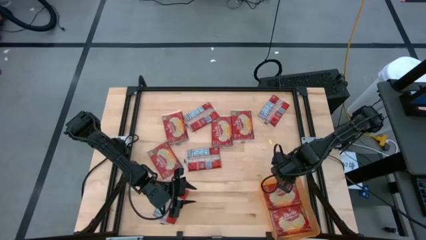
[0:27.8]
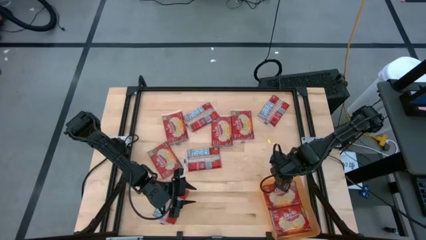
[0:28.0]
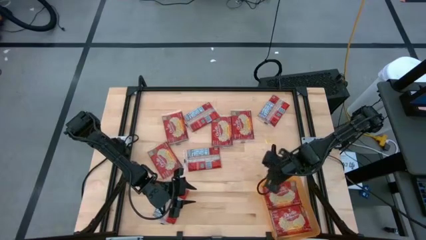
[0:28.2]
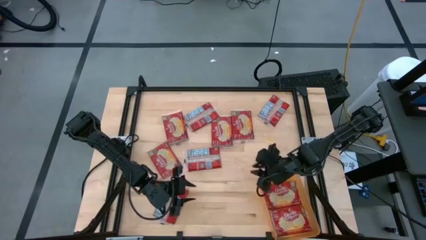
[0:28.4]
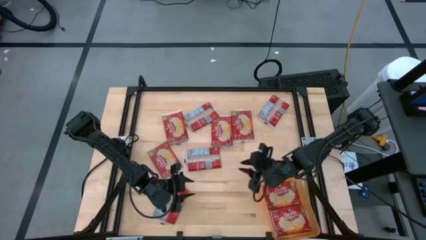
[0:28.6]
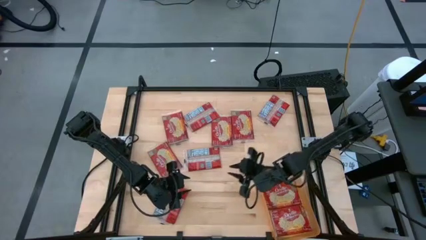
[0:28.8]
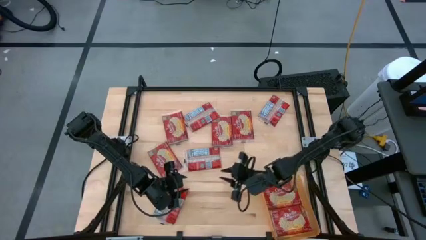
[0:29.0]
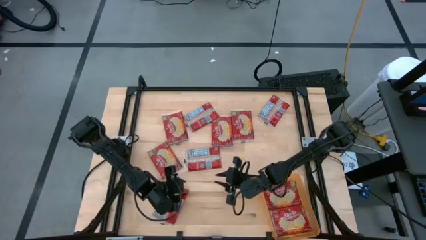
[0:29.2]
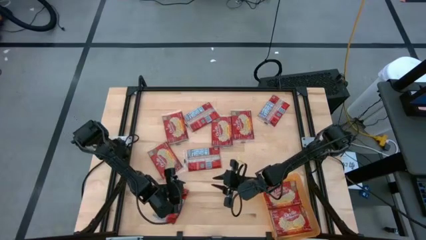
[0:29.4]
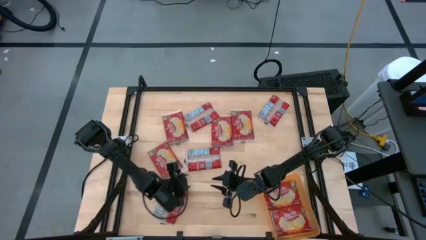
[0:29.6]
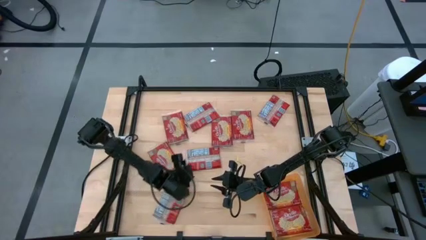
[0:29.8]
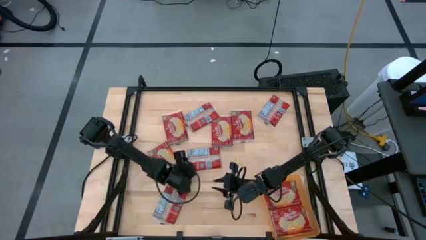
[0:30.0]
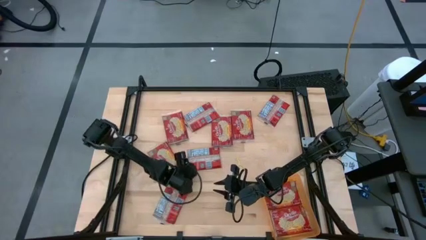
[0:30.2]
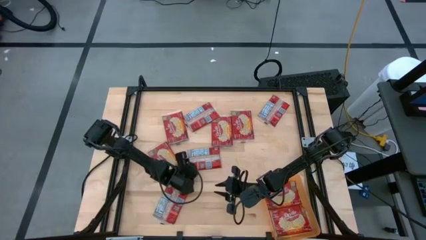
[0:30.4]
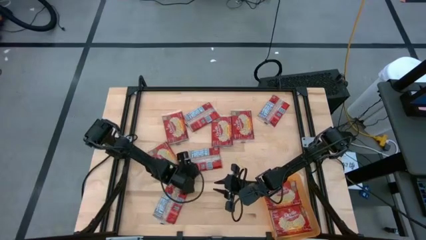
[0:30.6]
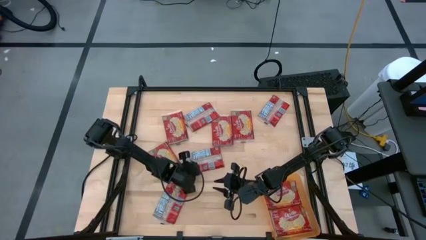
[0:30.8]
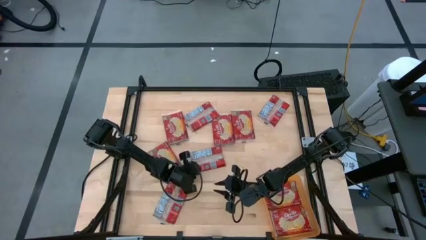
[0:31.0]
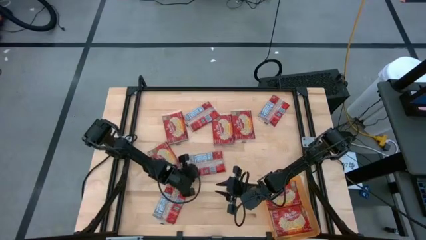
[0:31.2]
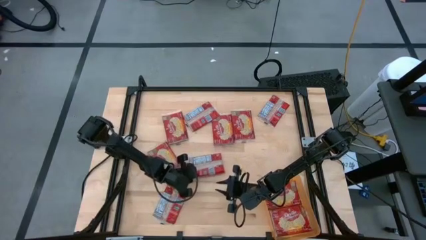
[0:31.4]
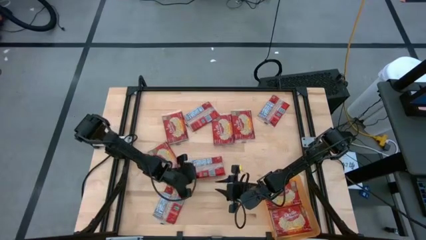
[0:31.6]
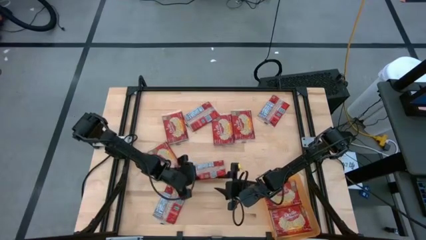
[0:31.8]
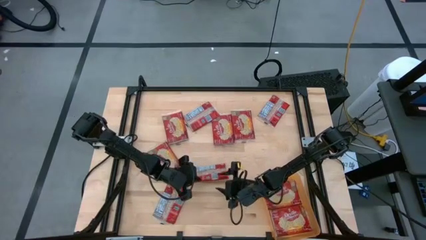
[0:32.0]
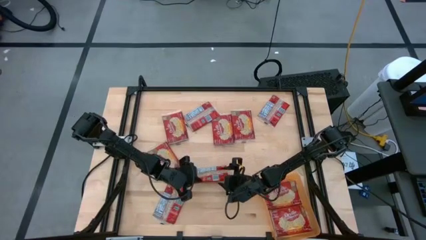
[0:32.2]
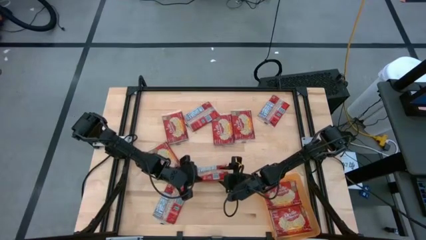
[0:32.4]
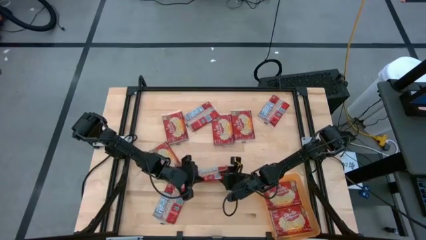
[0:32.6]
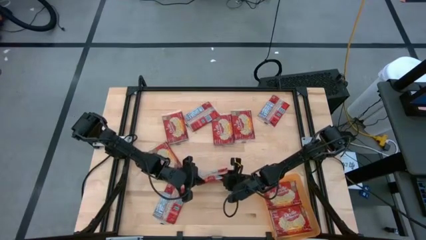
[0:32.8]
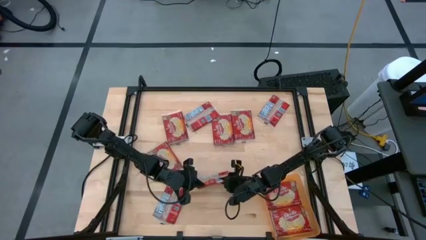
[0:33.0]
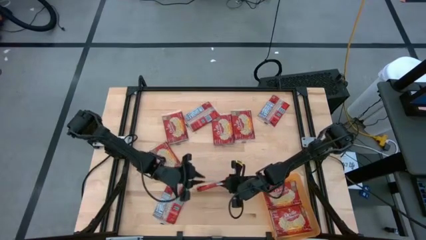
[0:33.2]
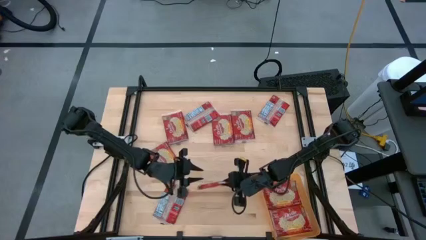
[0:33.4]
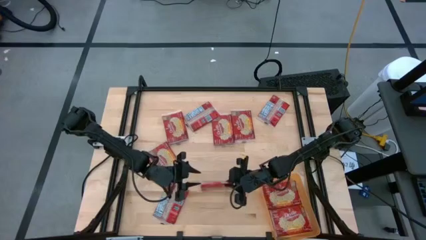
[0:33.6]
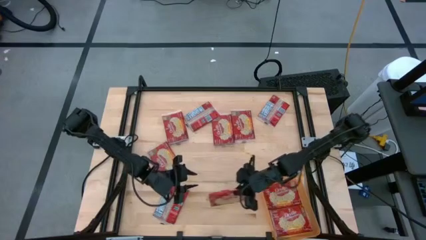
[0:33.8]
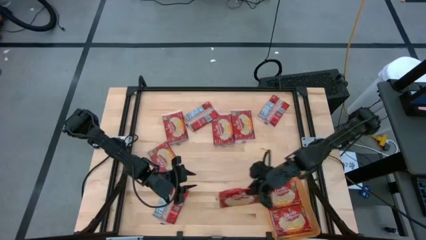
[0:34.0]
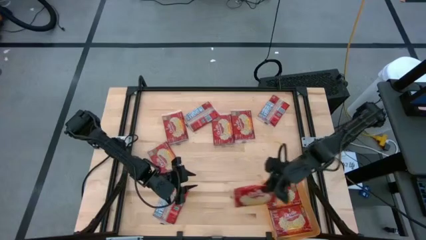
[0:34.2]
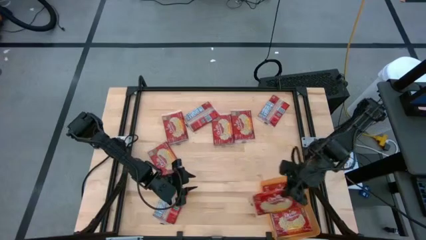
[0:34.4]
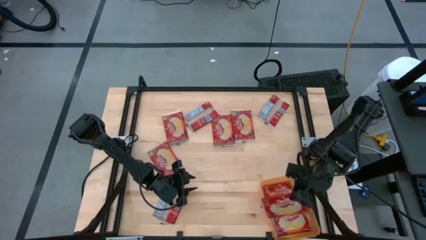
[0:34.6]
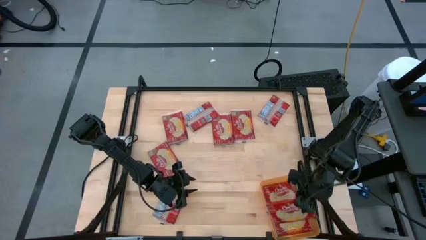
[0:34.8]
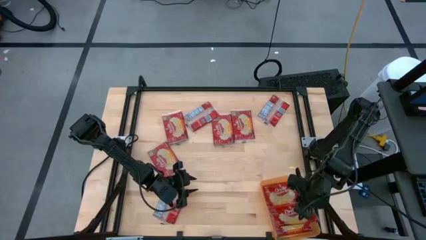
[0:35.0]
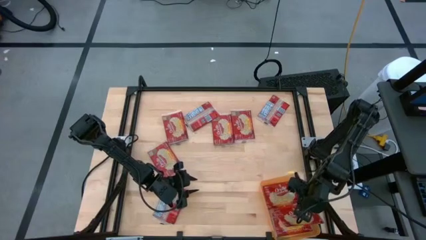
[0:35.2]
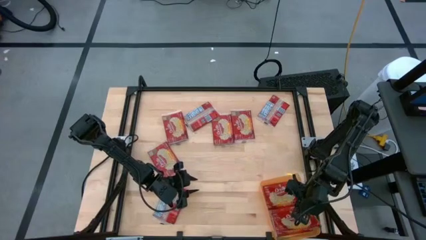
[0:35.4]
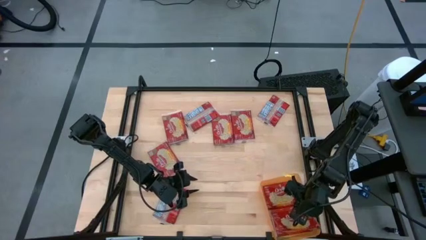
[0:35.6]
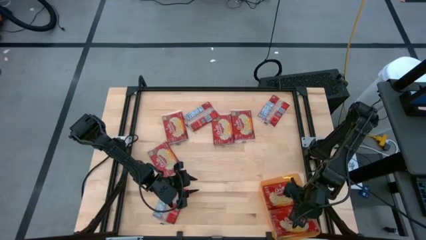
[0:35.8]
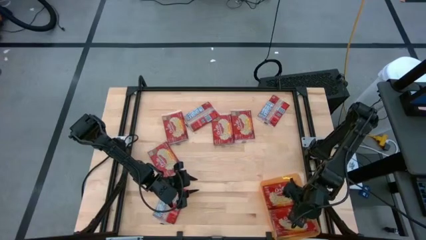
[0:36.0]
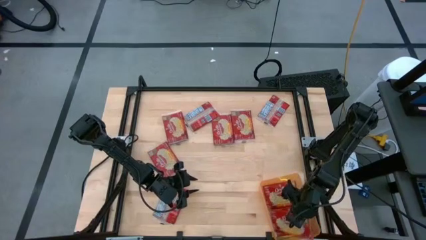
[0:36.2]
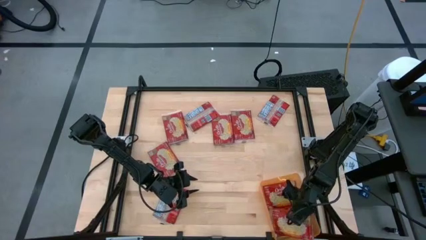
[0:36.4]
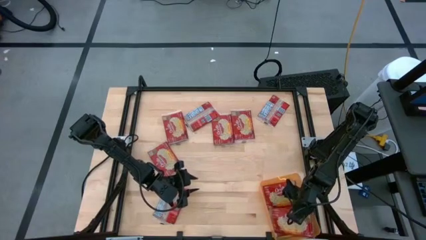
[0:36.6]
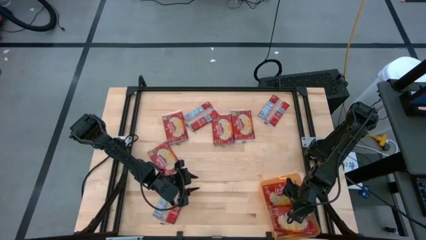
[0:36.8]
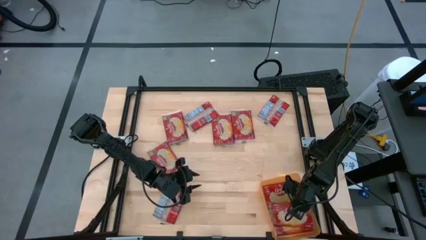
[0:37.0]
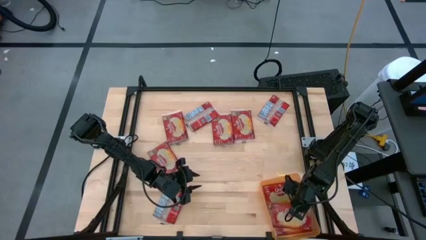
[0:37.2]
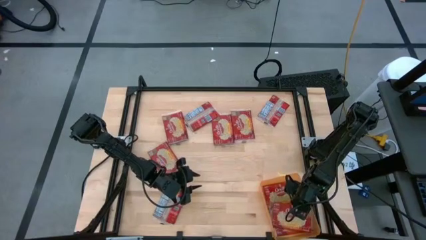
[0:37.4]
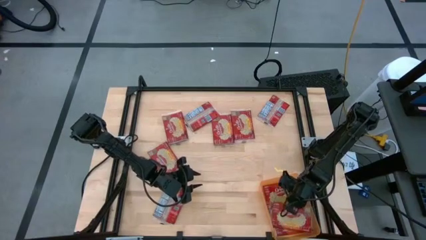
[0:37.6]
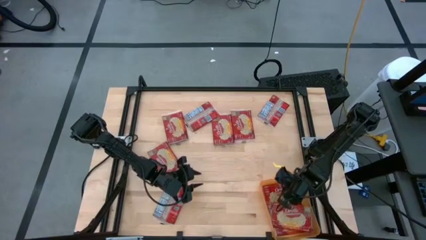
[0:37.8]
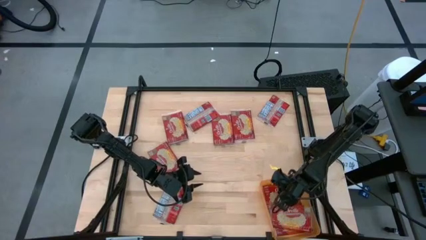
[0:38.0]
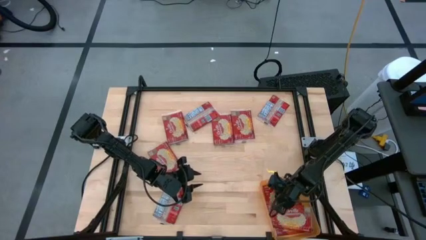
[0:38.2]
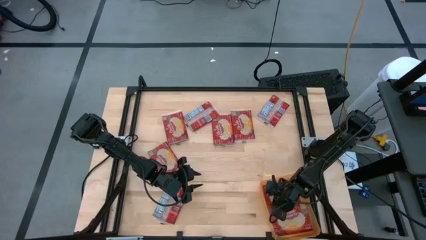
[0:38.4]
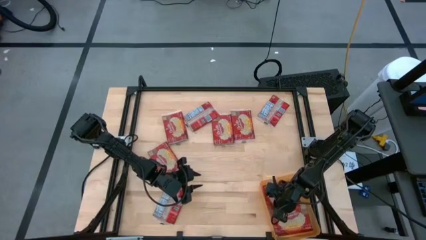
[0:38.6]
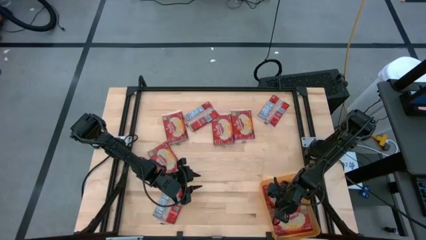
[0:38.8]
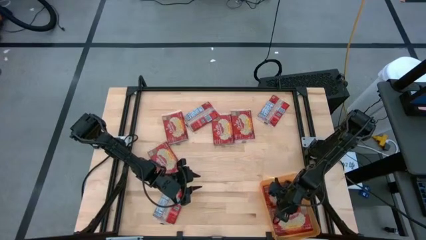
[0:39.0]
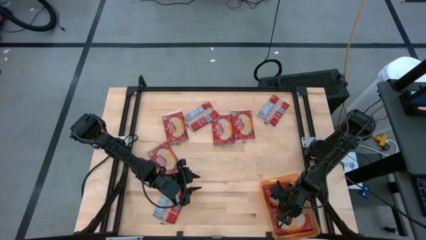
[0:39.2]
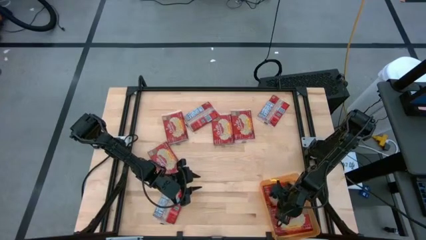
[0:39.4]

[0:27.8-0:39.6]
Task: Sort popcorn bags into baskets
Put the popcorn pack into the orange bin

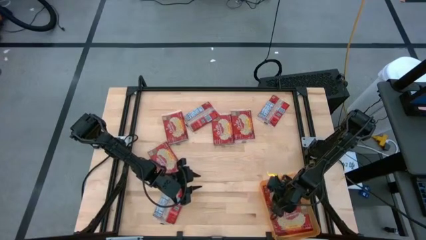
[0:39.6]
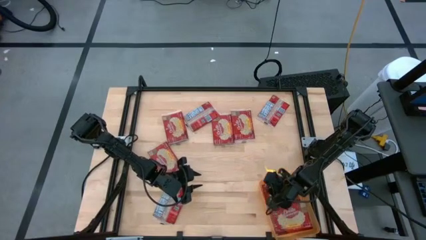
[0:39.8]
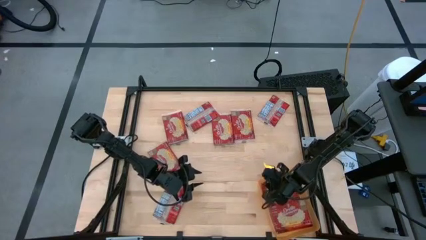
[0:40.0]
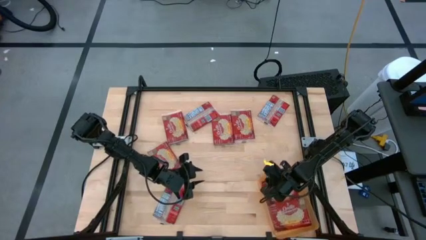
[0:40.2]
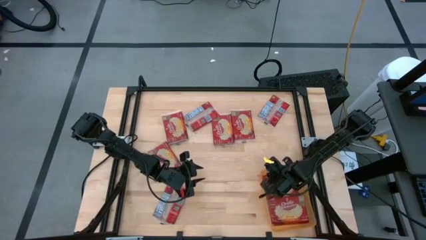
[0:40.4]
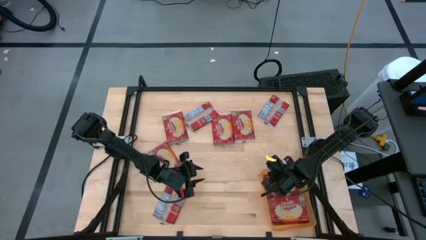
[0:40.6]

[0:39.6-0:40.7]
Adjust the orange bin
